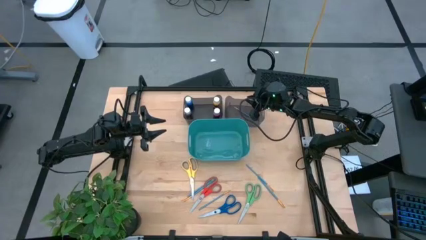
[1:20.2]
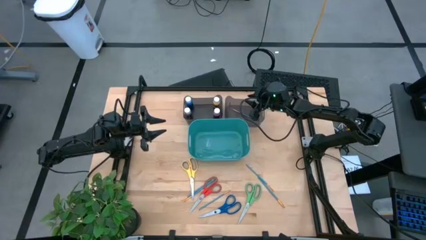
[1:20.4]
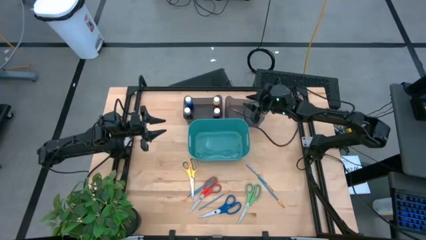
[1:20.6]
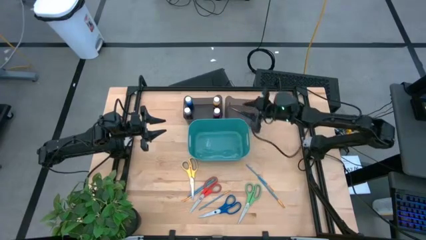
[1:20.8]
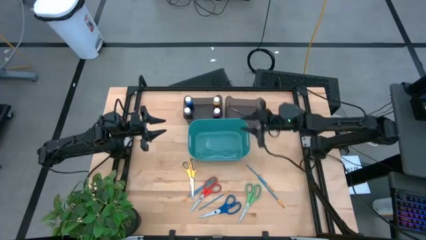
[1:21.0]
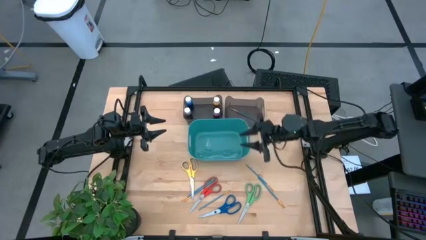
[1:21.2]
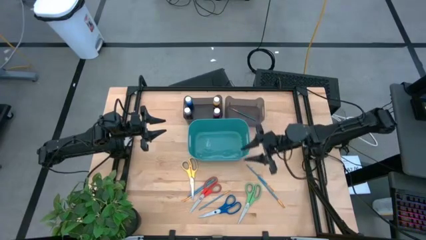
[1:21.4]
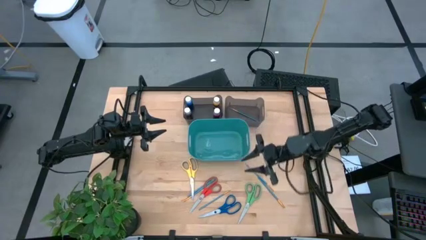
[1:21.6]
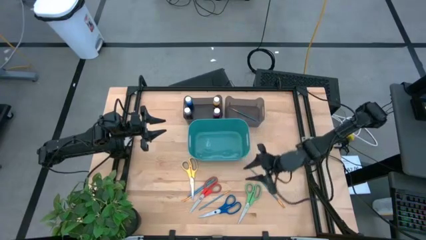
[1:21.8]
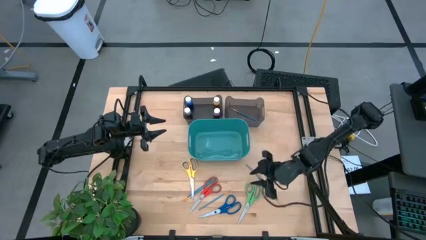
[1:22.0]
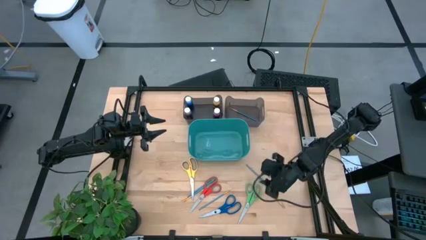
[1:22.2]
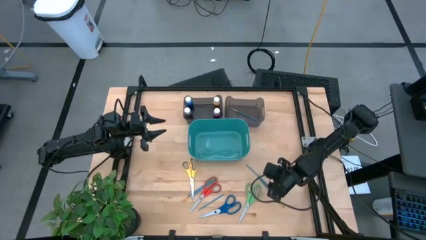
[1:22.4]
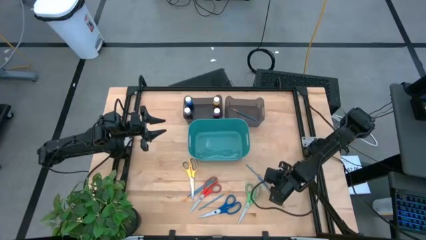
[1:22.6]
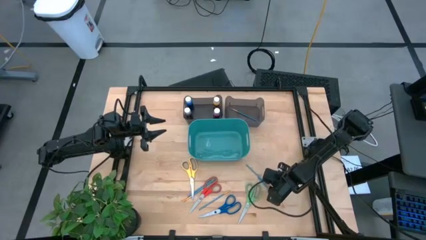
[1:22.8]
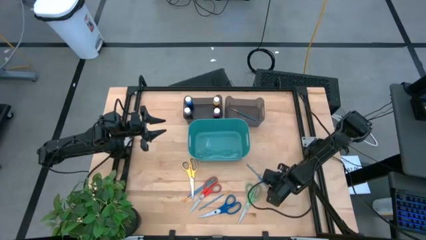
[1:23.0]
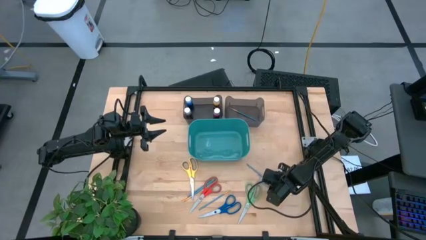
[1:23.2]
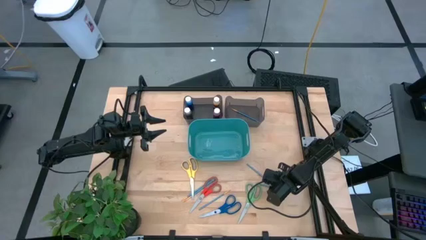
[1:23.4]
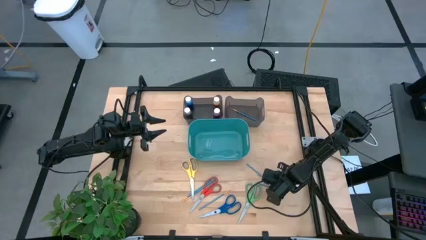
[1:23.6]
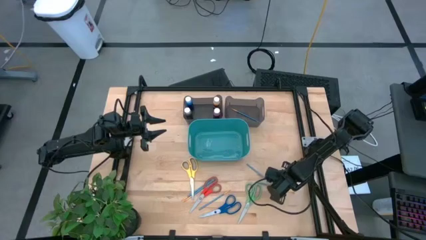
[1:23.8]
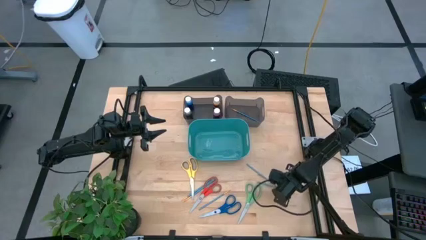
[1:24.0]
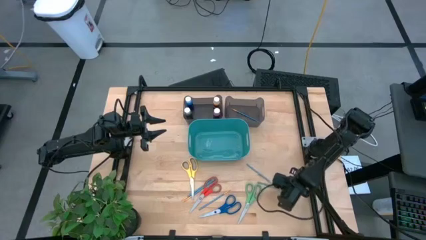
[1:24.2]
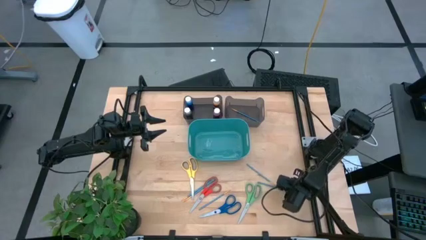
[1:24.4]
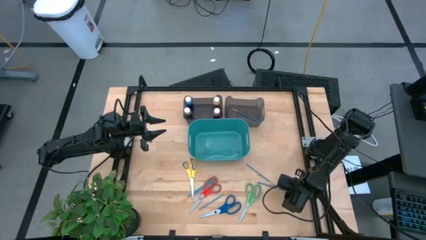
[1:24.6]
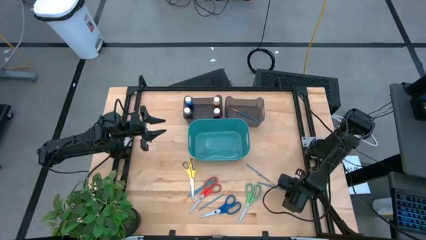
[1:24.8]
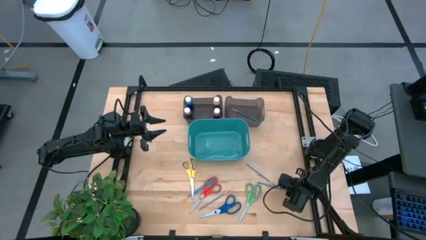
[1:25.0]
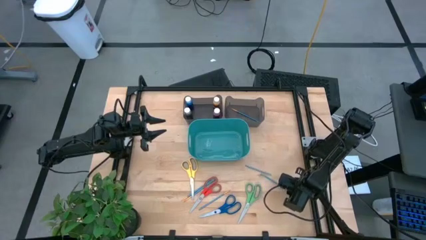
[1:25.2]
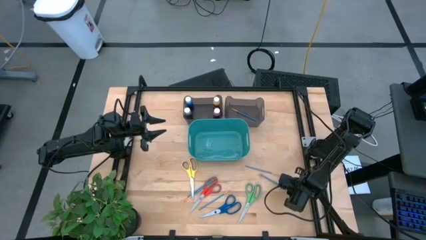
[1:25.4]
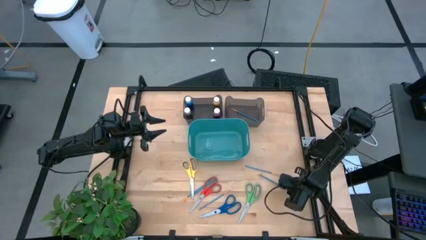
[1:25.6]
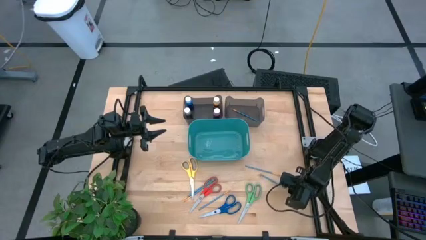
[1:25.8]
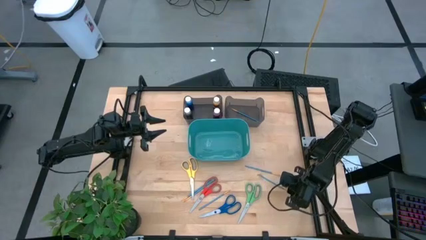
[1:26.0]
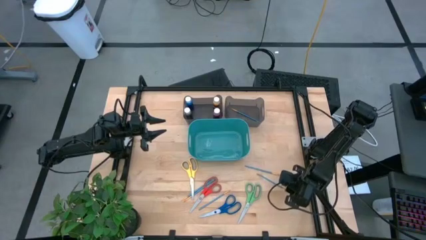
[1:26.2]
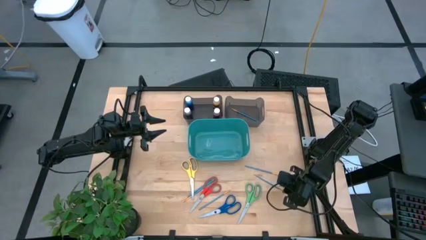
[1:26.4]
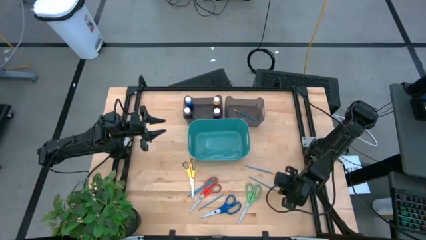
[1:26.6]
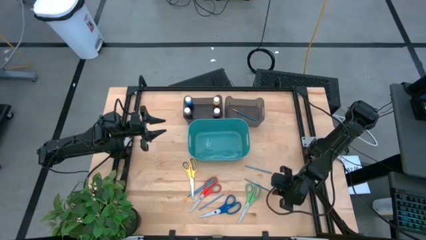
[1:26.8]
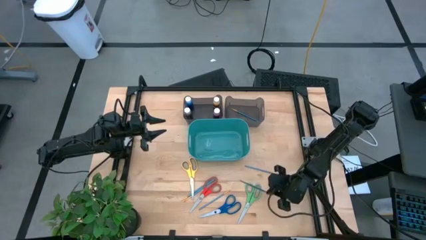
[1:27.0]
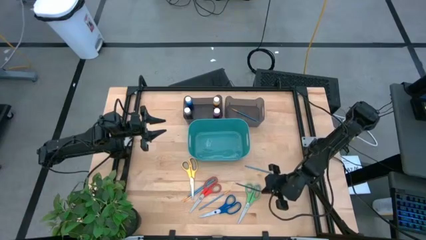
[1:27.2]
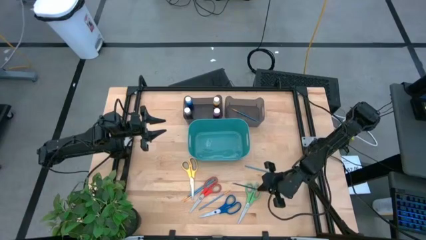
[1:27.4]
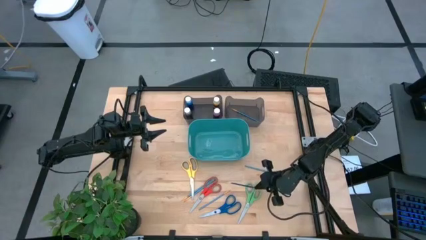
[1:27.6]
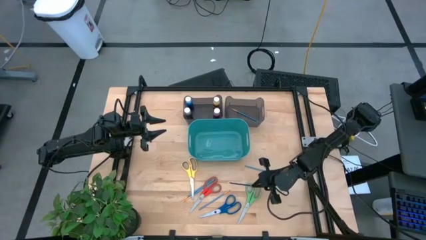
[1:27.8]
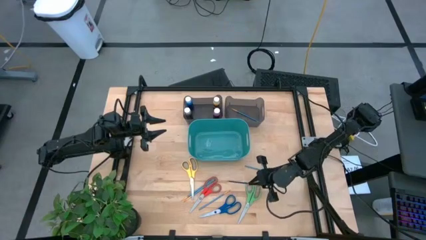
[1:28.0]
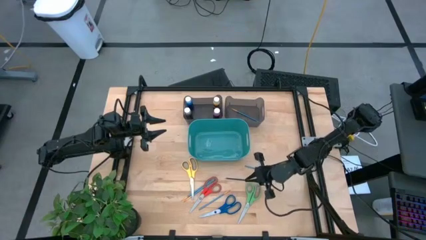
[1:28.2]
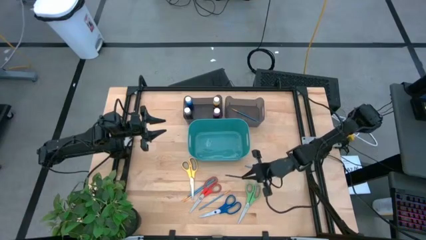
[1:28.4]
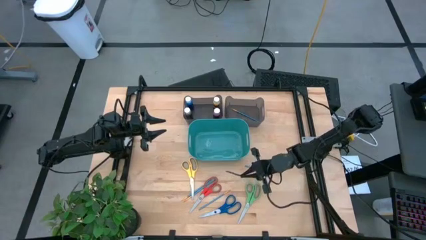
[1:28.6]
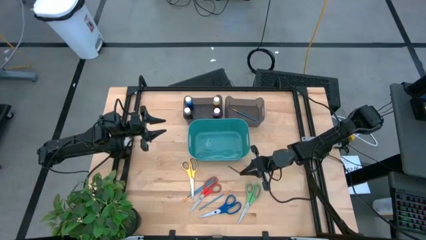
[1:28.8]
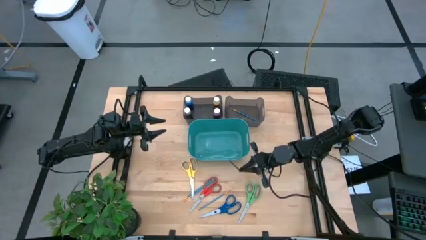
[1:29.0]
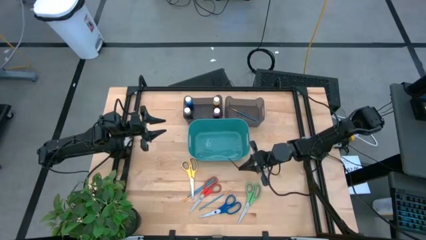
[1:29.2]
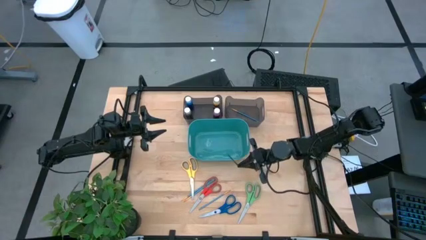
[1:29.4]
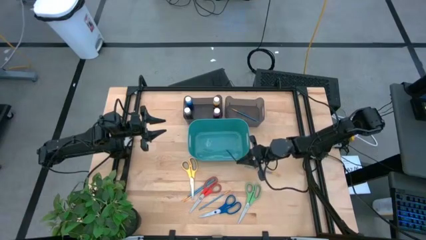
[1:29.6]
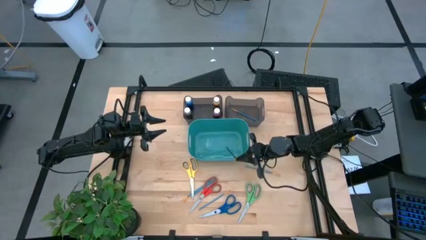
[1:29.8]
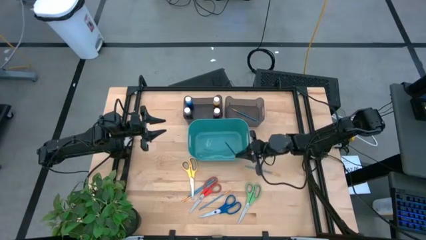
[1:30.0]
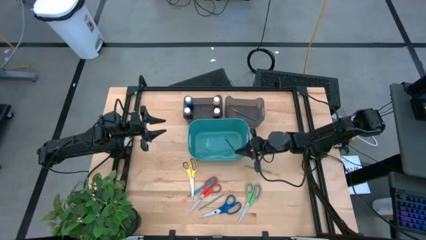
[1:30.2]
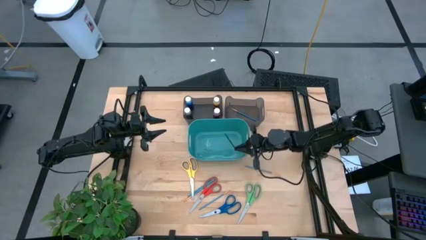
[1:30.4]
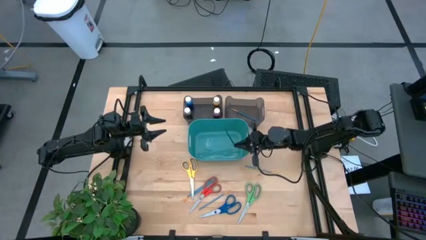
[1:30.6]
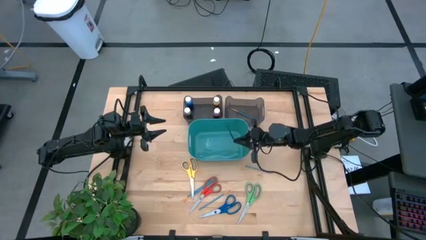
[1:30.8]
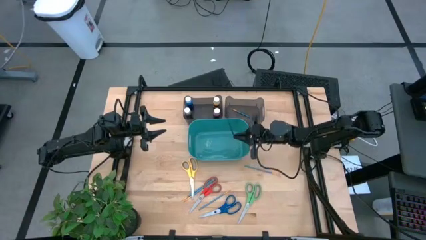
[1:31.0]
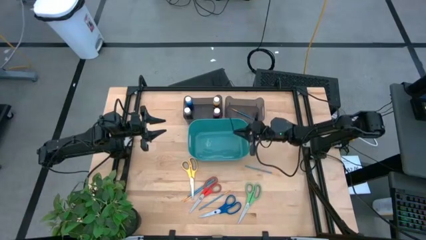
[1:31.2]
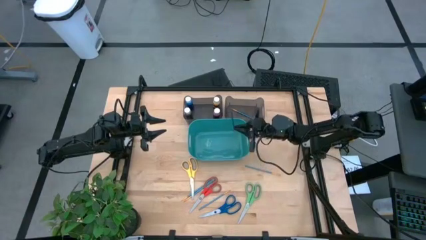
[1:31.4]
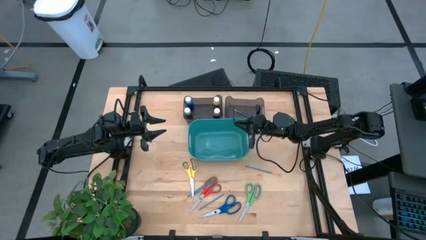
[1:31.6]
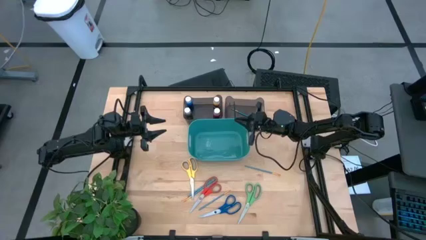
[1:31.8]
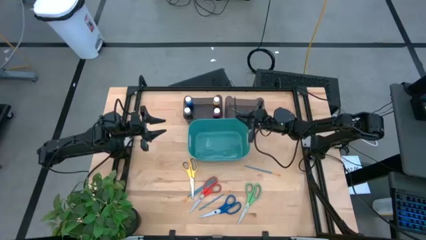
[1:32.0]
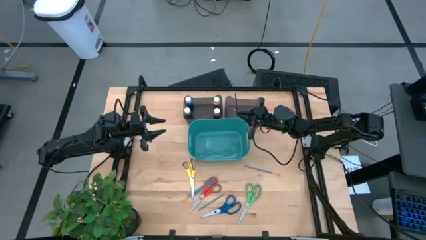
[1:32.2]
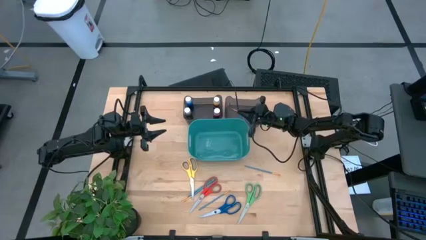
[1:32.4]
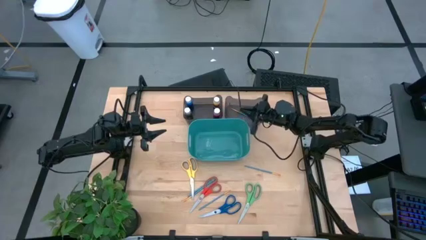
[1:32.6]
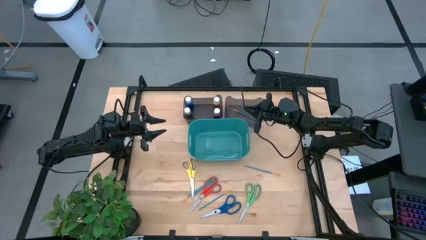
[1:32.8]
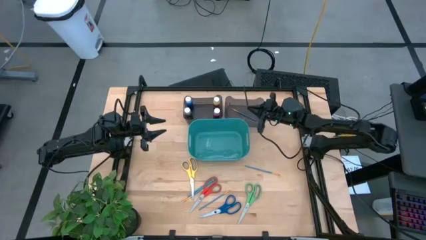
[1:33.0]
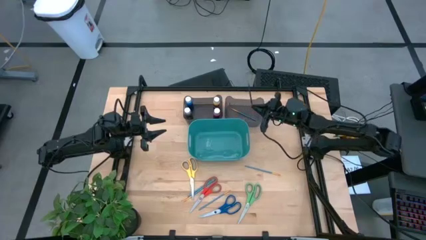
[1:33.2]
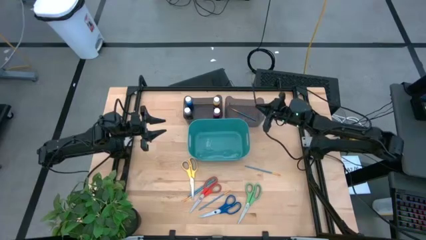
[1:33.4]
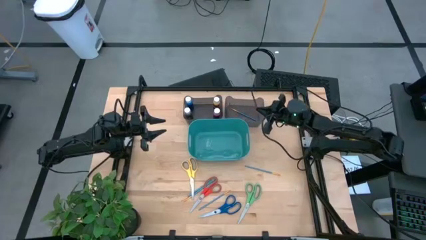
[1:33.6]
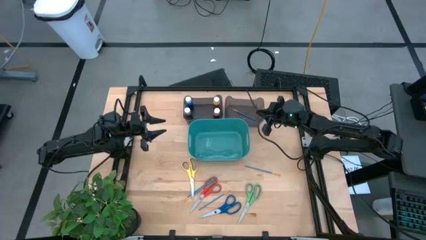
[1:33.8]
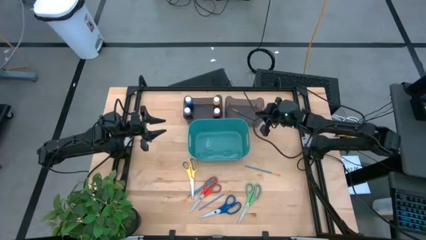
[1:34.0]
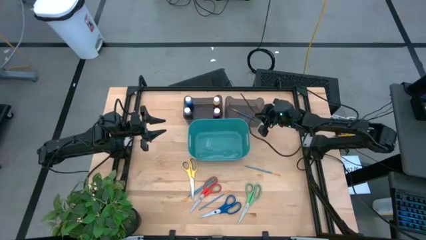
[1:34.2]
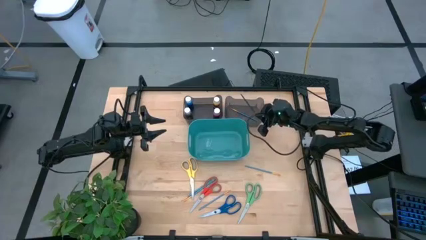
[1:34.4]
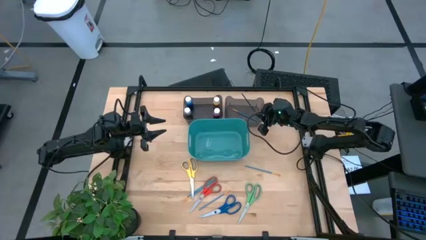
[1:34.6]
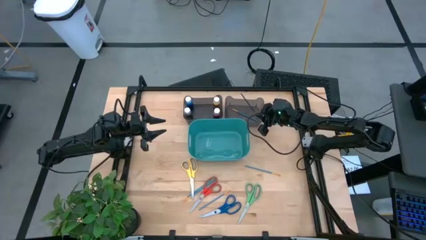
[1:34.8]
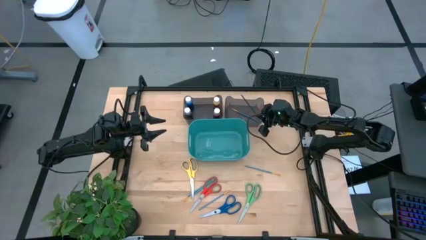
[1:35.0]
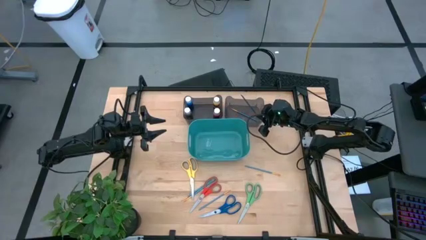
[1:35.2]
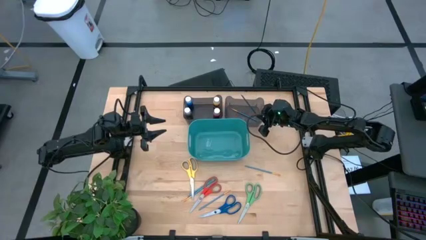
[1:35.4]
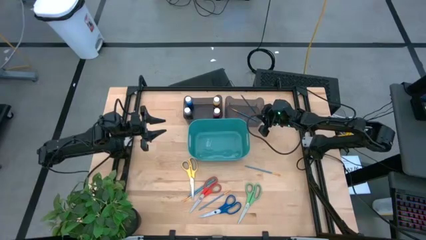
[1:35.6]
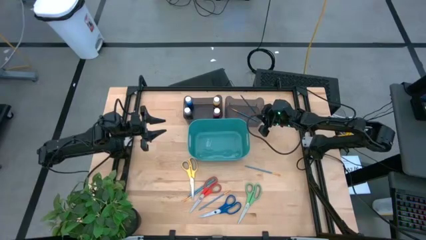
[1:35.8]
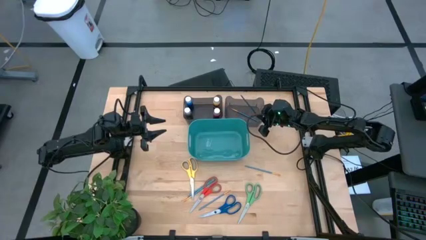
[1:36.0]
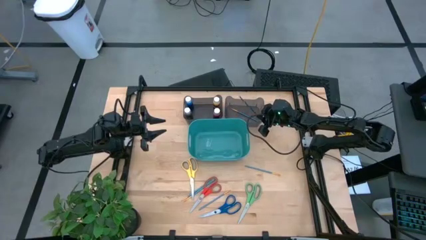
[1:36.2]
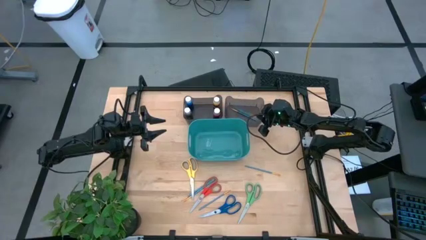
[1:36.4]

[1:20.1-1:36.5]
Task: Pick & Place Paint Supplies
Put the blue paint brush into the right black bin
